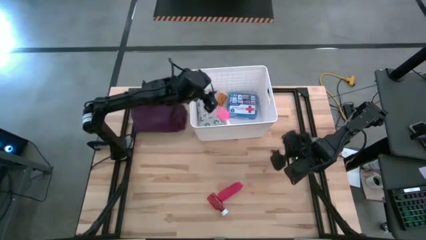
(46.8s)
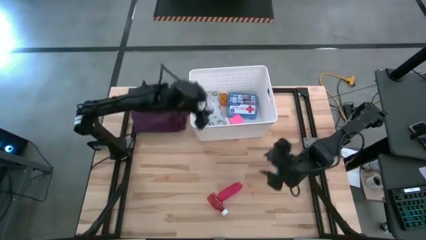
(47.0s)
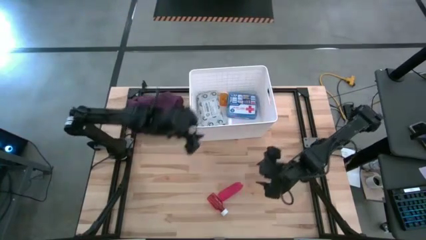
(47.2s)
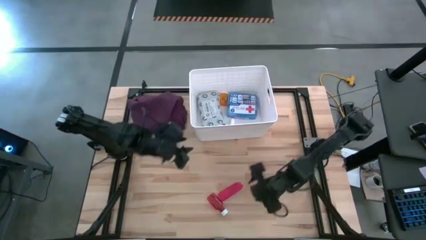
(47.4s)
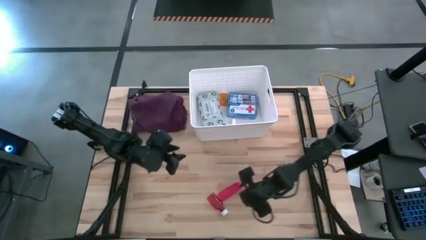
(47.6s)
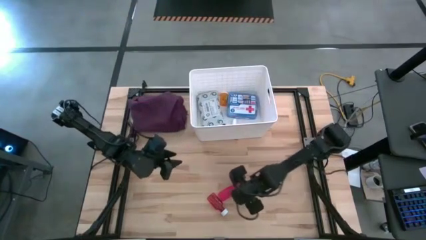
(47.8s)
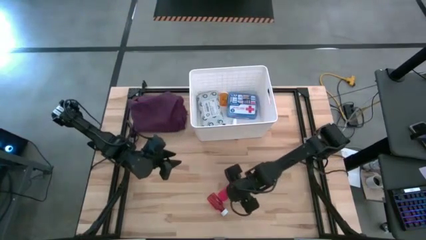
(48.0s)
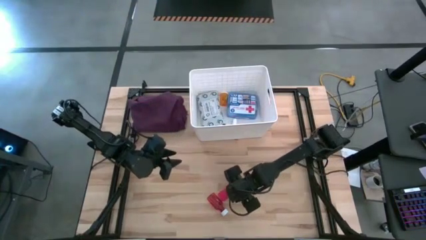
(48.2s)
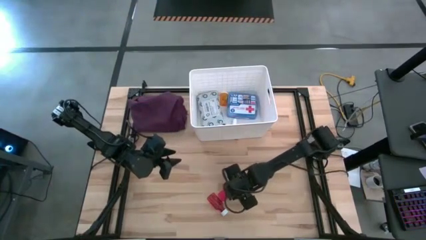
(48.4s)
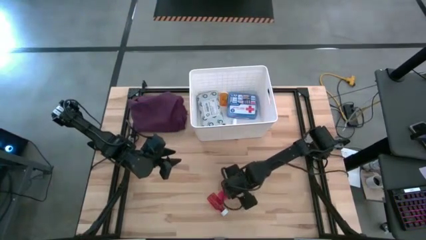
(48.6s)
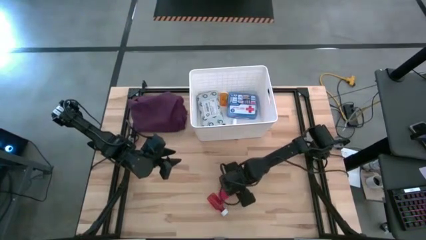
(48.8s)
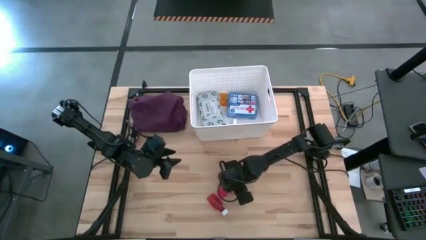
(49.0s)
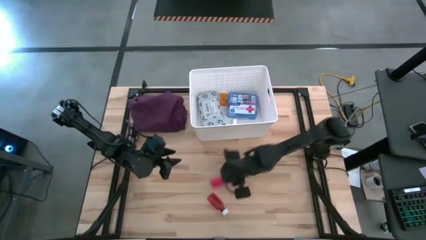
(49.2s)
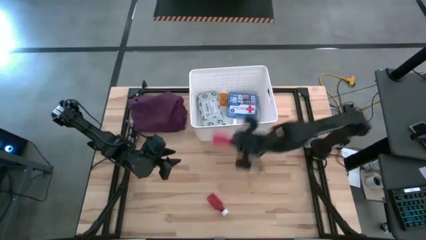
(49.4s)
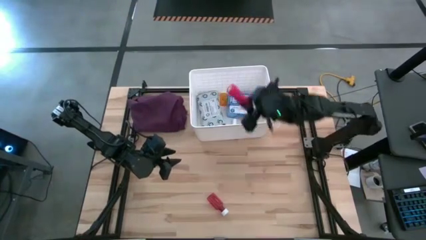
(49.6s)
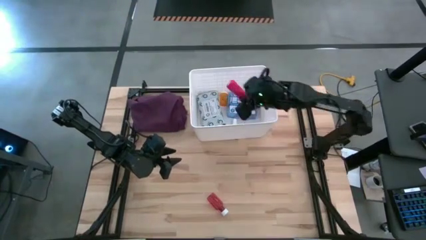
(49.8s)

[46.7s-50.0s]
Task: Pick & place medical supplies in basket/bin
Put the red bandage into the white bin

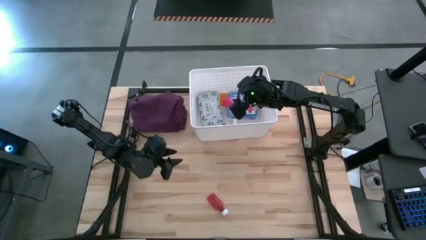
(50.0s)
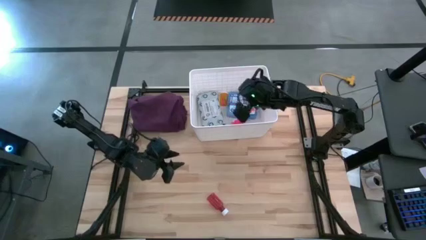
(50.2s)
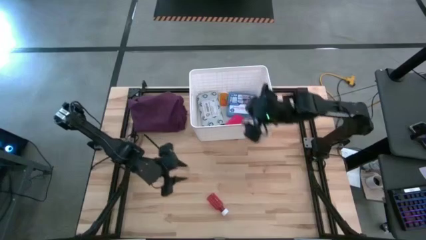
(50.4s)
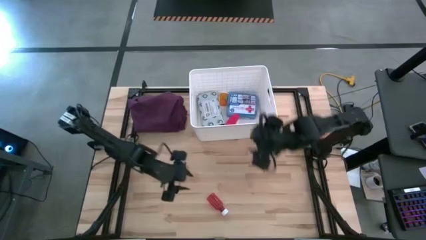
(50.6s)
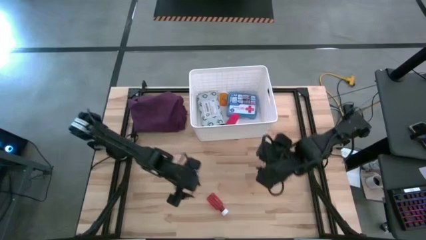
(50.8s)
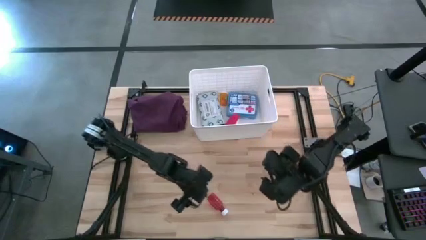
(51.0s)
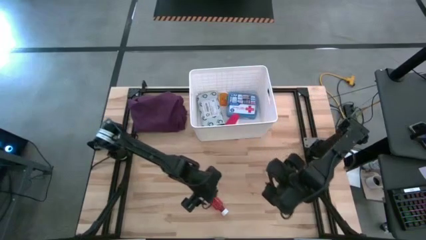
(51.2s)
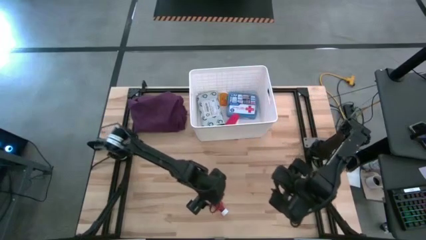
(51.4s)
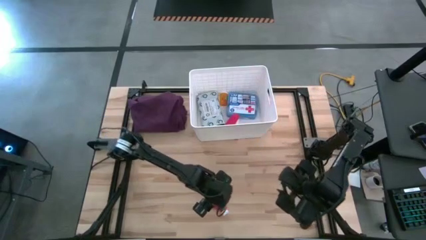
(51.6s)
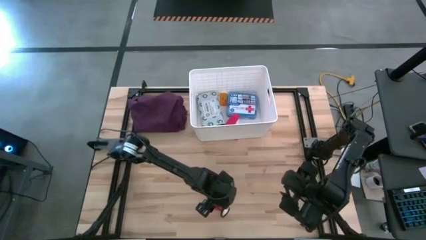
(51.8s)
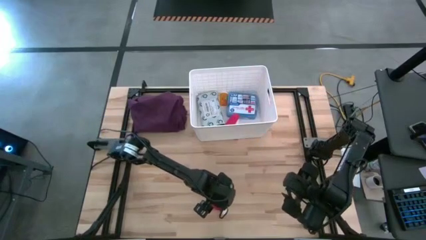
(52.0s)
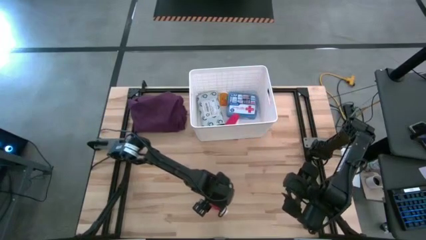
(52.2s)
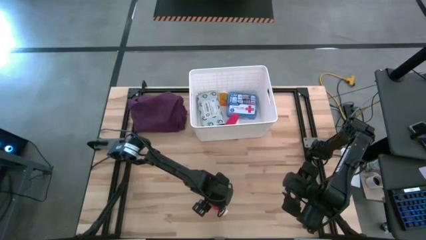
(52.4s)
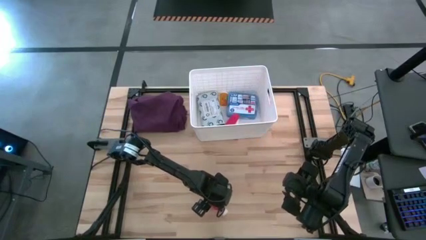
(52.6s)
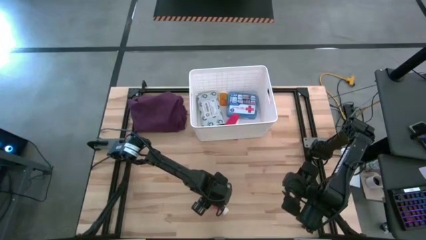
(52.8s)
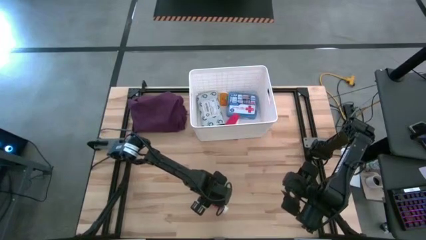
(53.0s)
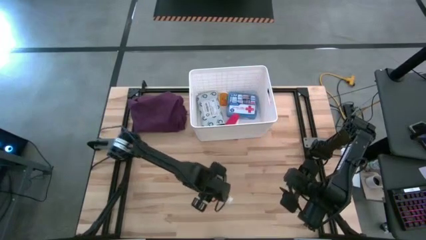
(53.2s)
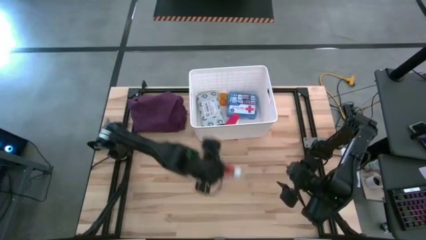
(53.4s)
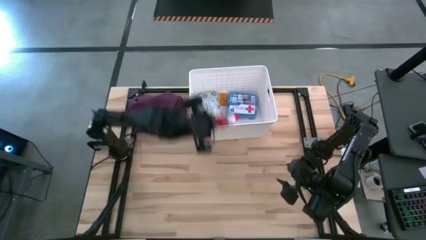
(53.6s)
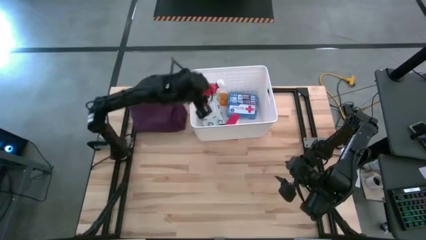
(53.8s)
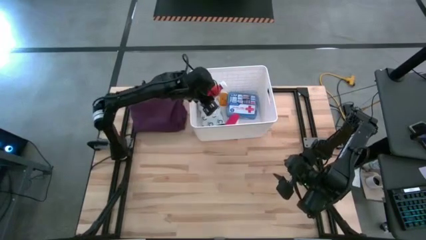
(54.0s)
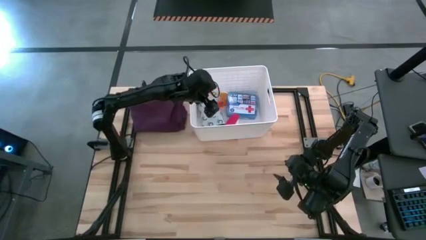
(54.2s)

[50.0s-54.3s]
Put the brown medicine bottle into the white bin

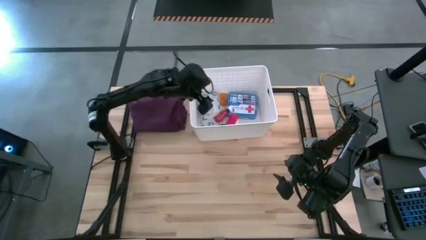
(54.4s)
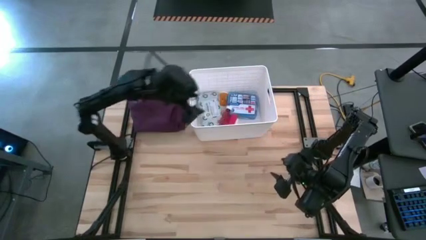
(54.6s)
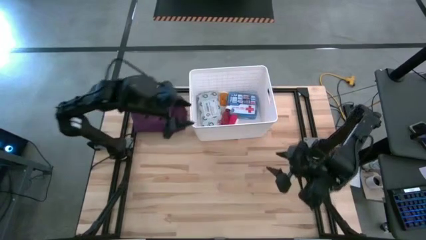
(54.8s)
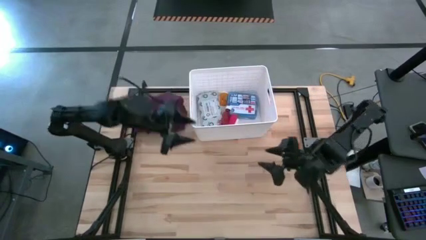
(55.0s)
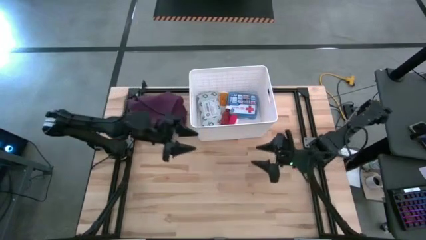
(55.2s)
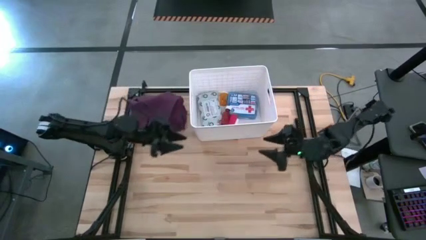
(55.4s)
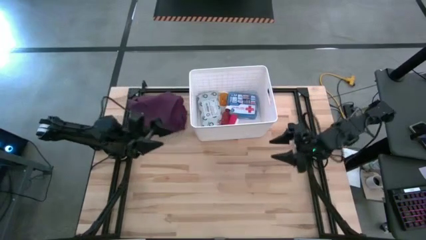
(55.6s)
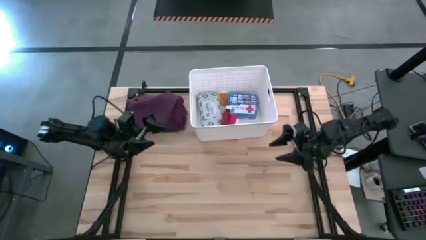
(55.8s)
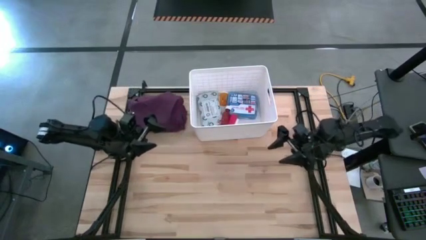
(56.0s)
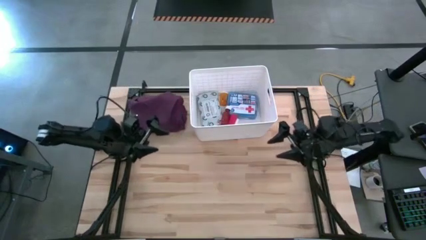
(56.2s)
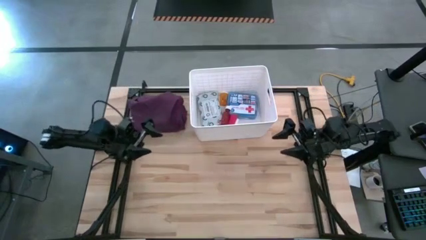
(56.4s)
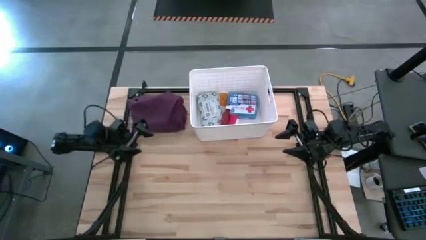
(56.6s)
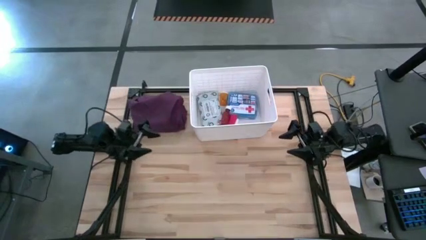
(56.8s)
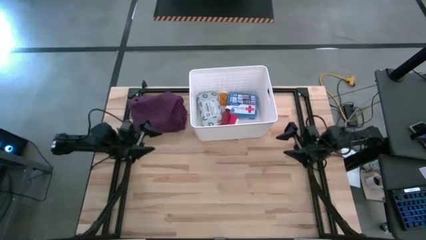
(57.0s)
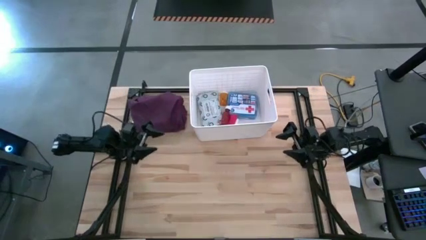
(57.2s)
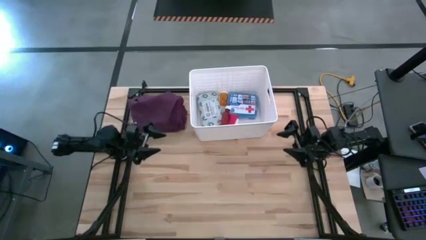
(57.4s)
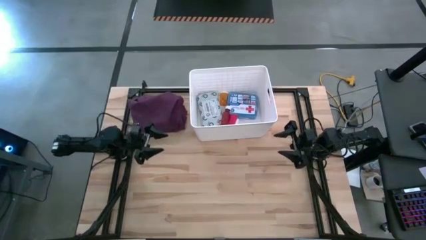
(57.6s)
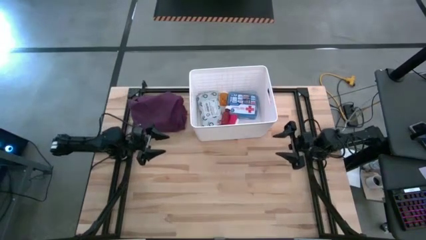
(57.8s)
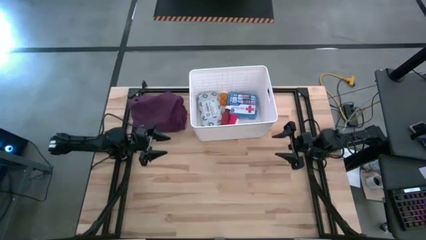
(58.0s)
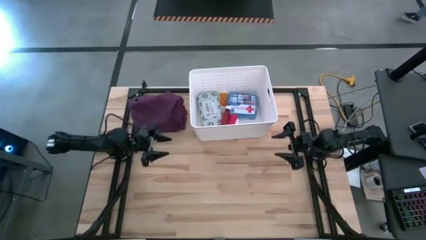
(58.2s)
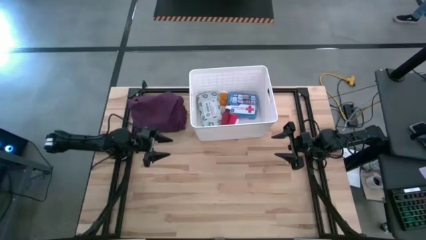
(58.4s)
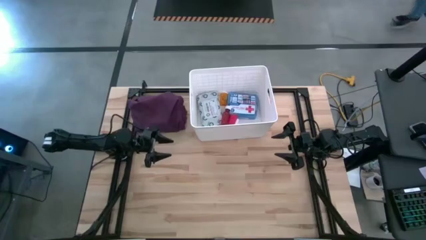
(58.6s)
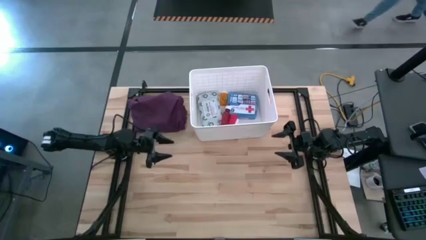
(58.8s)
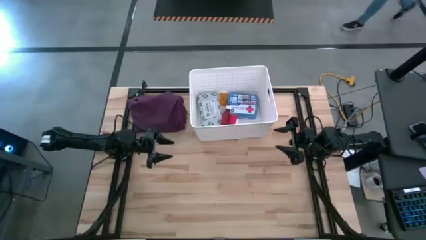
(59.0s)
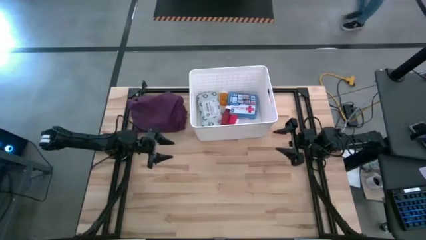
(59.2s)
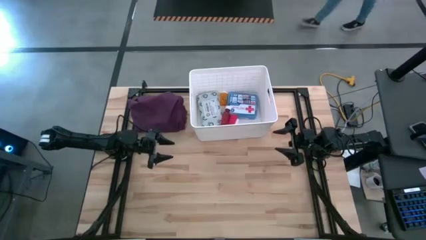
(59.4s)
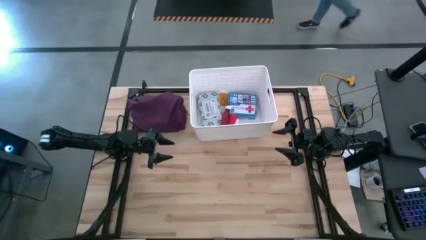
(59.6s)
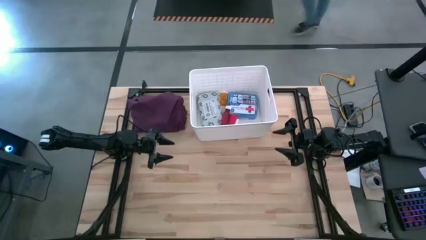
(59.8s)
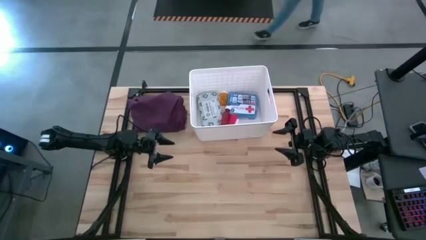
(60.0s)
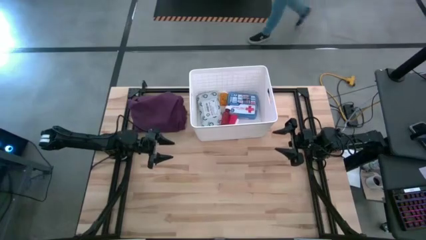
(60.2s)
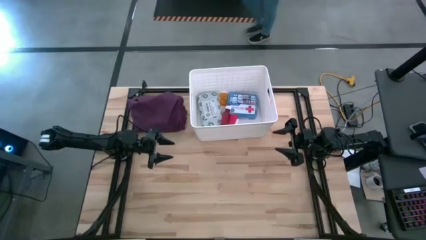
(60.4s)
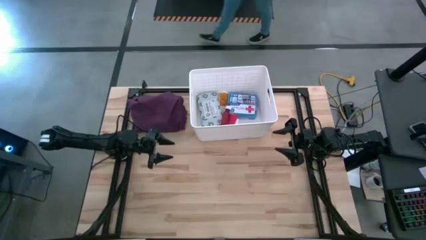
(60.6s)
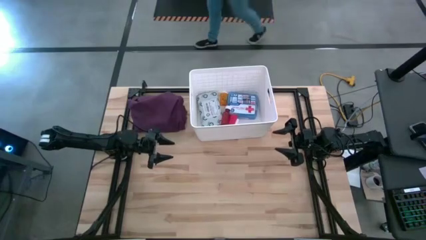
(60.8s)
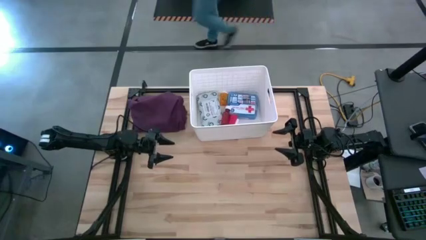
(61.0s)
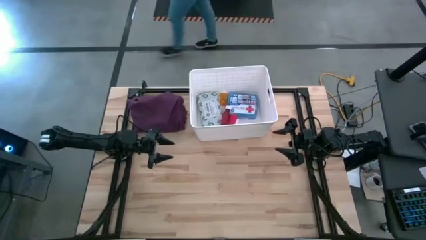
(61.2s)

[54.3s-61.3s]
Return to Home Position
